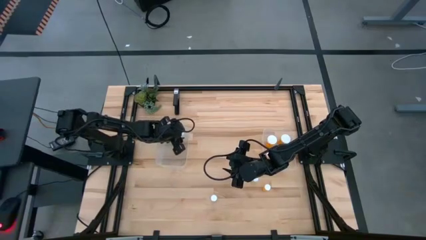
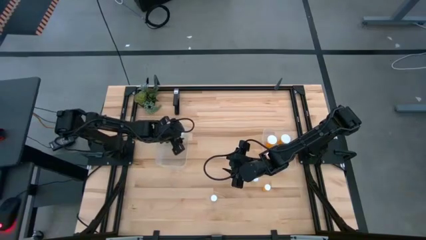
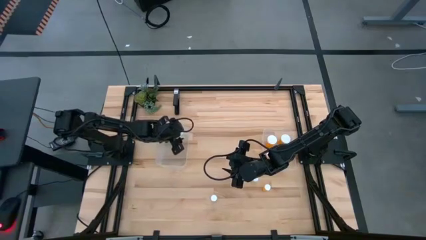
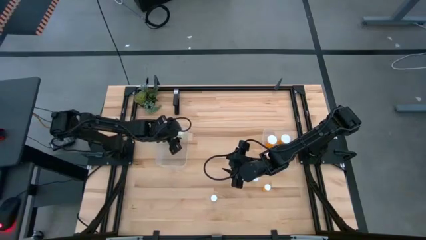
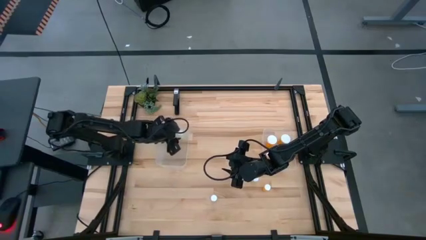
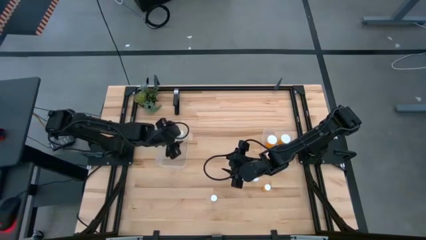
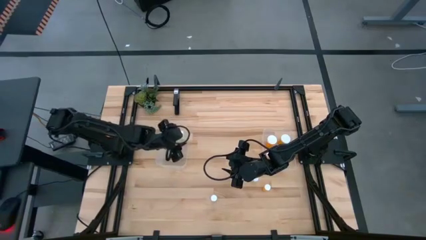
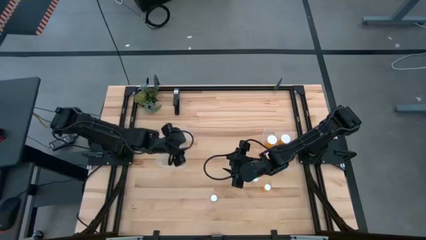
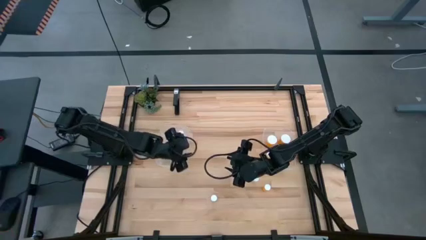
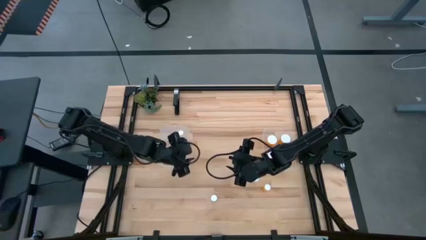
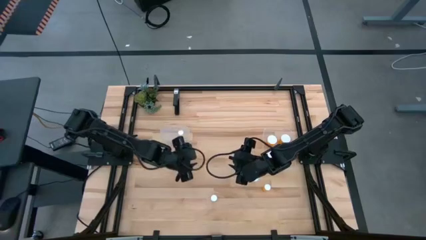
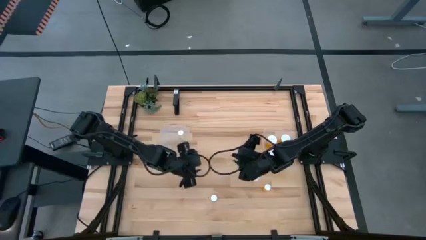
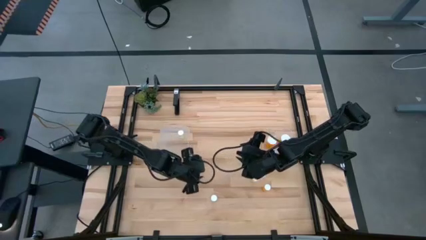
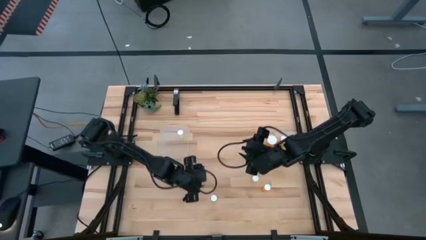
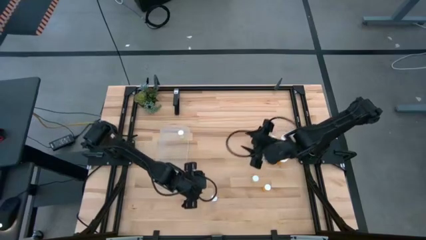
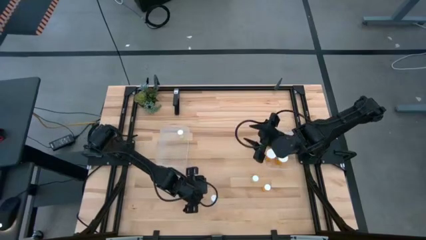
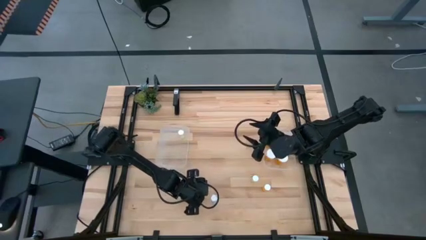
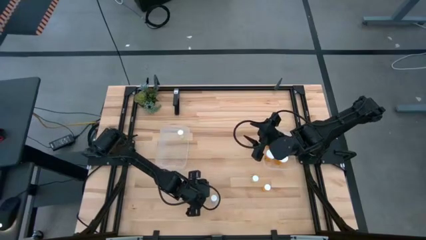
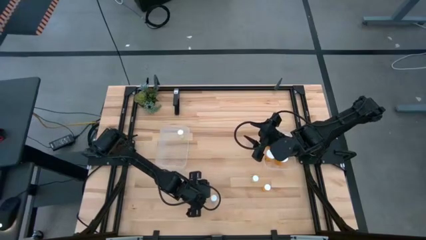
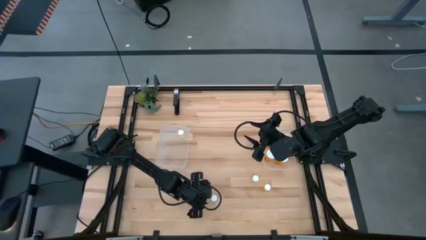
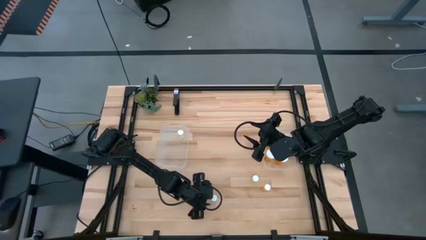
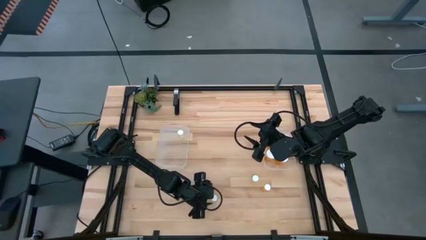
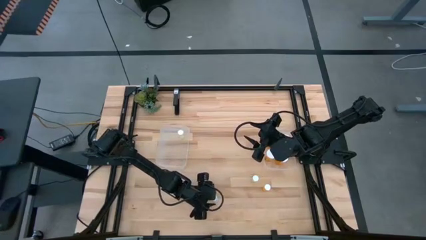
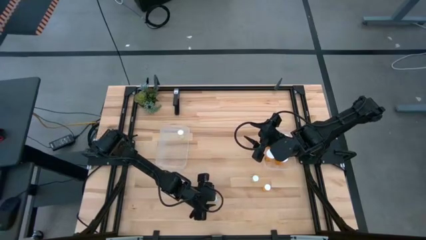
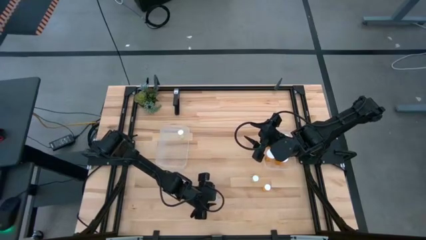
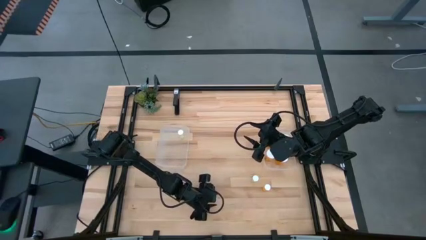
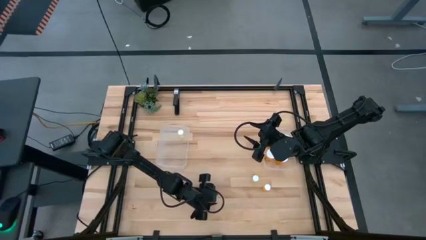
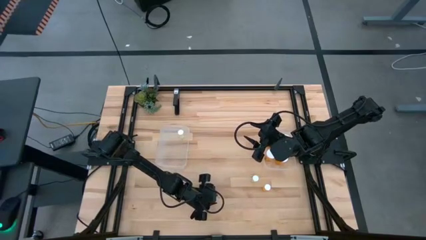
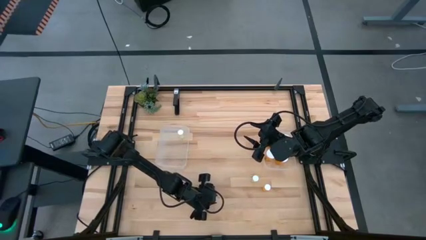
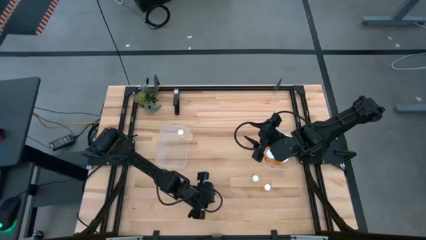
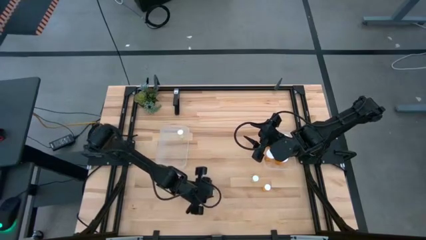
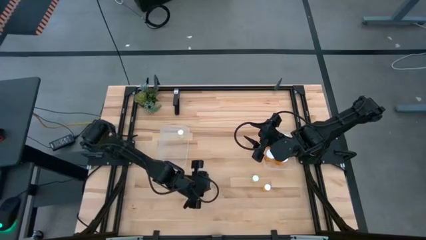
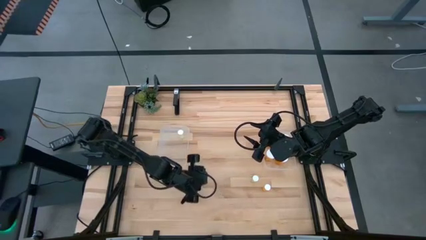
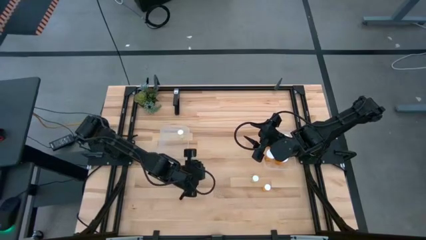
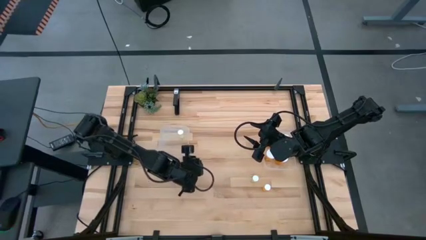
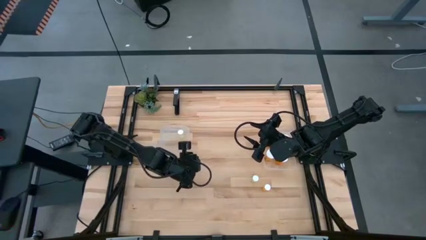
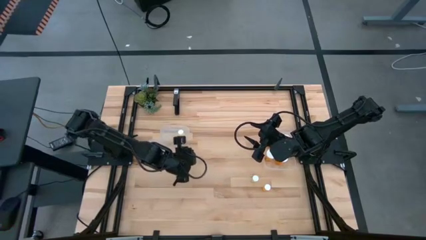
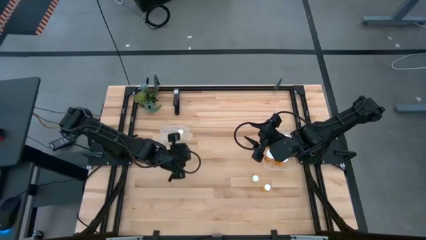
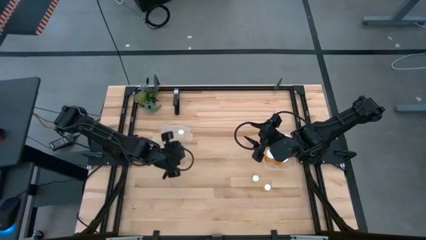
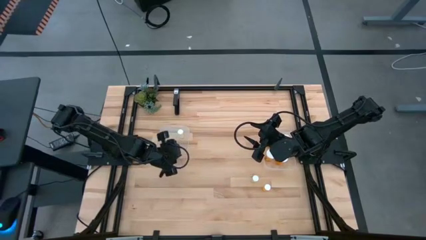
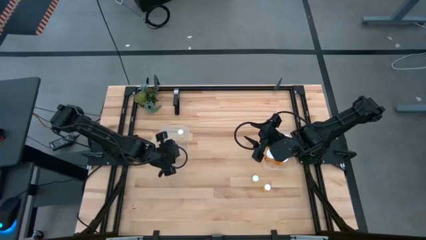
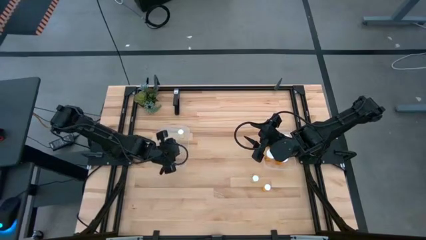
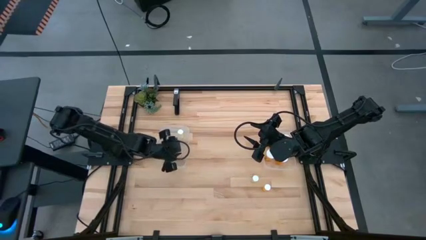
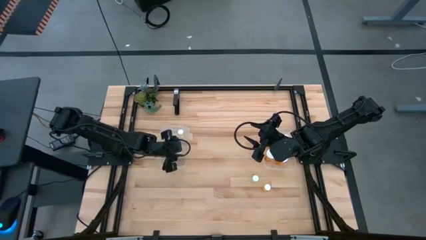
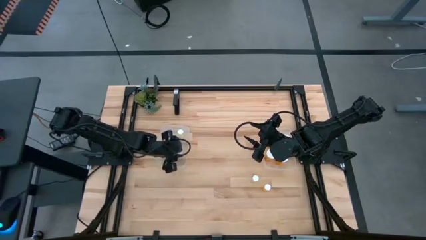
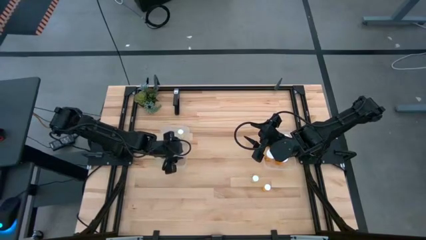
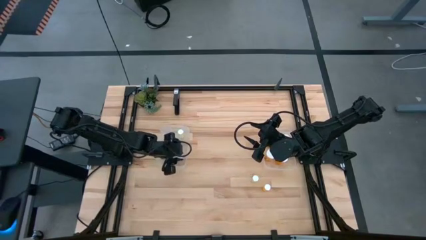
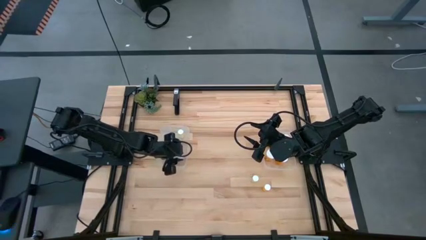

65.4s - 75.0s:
Task: Pick and place medicine bottles into bin by pill shape (circle, oval)
Put the left yellow pill bottle into the left transparent bin

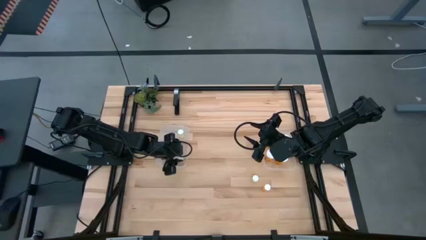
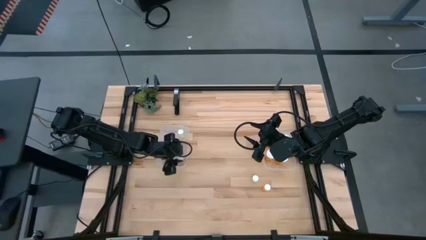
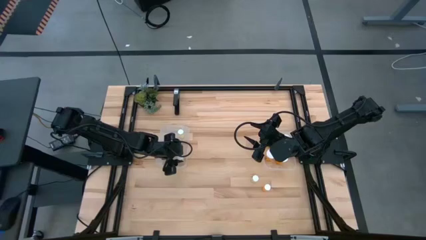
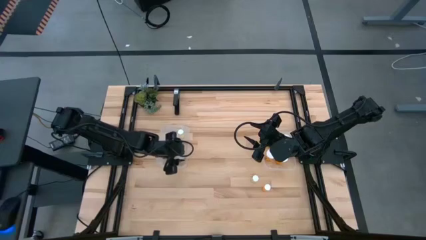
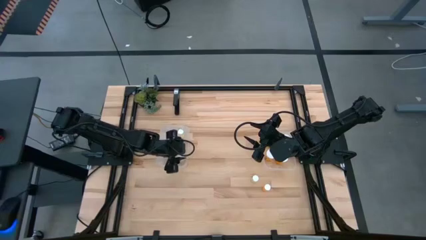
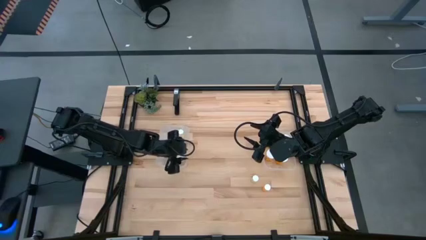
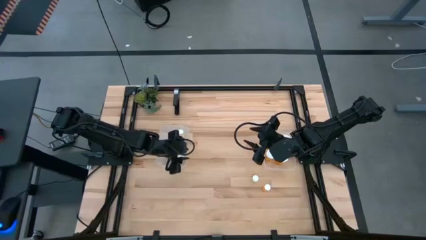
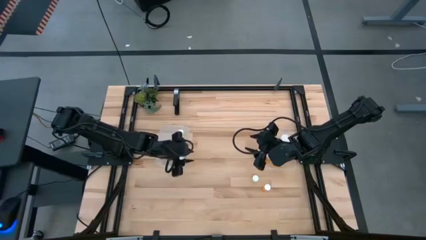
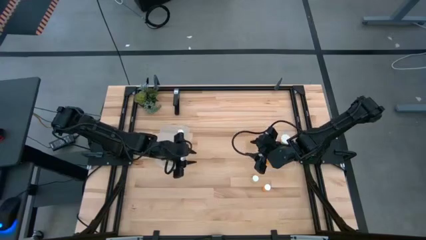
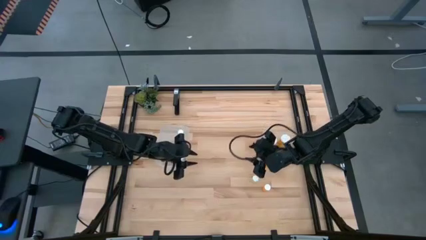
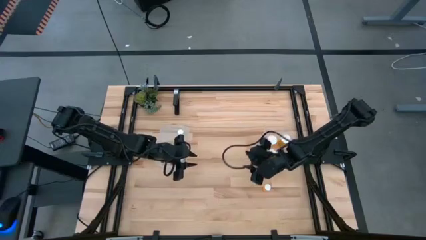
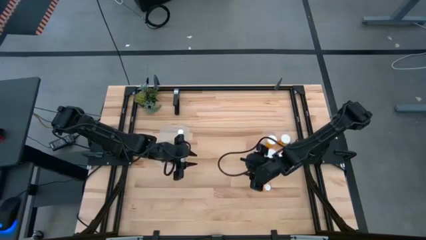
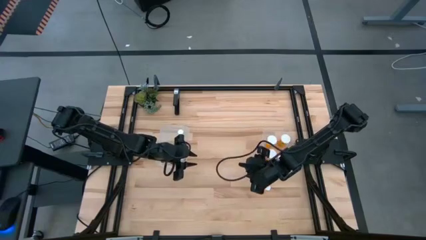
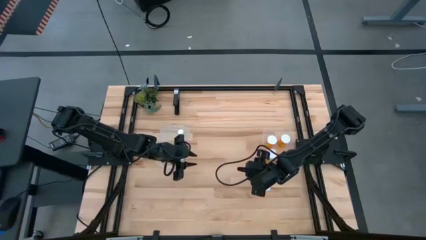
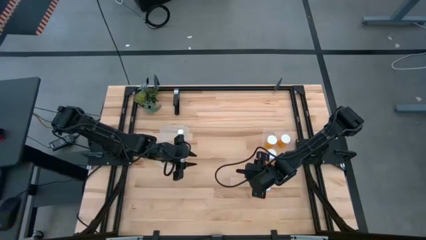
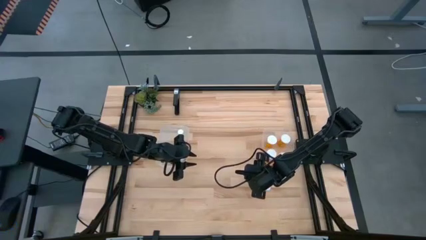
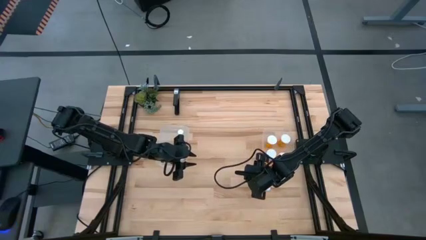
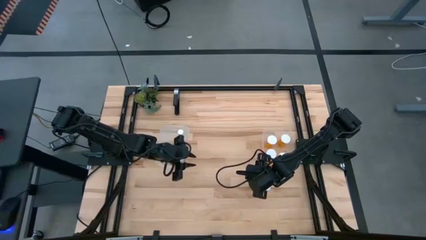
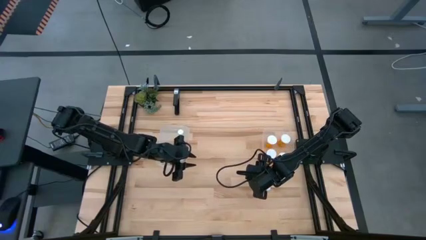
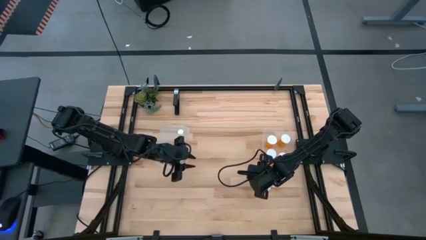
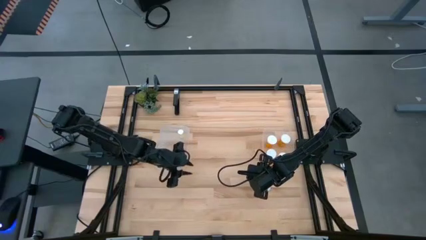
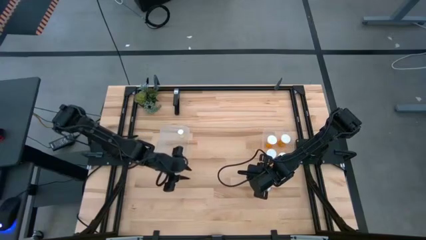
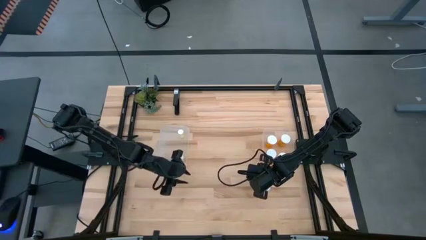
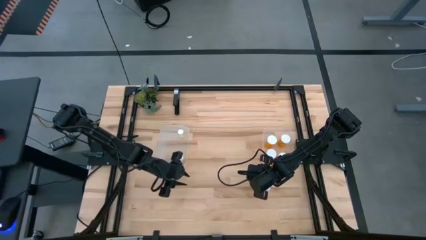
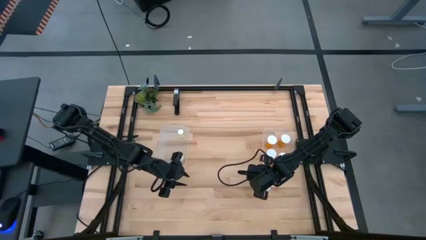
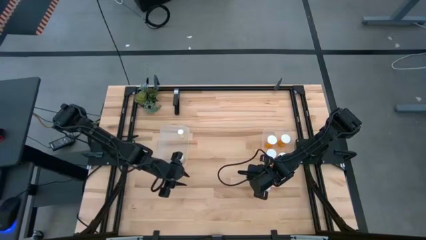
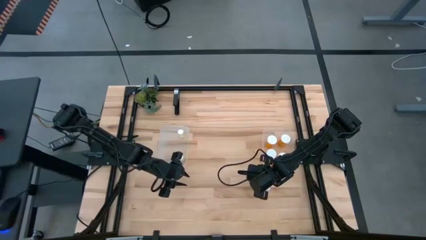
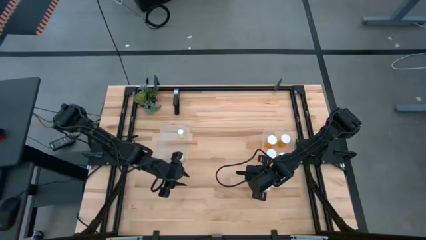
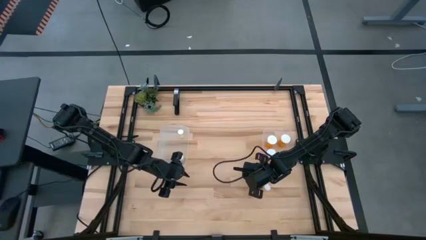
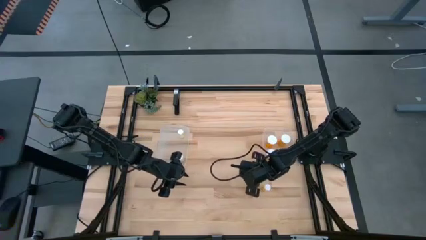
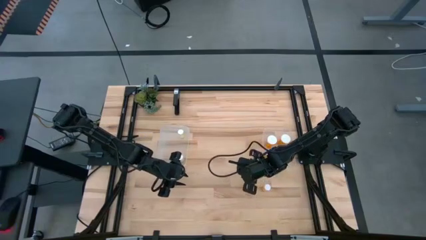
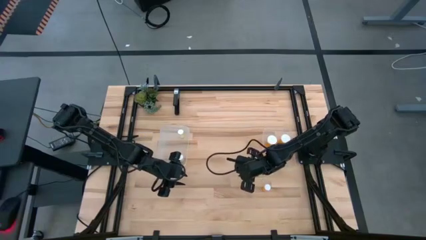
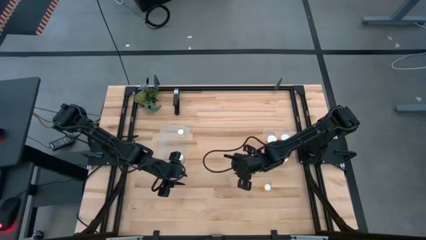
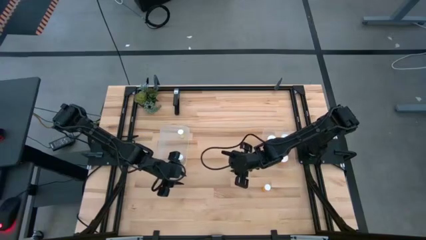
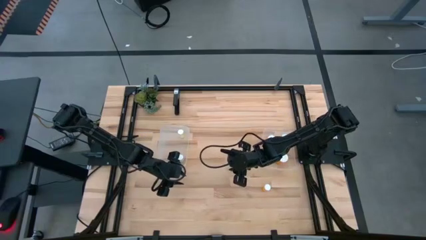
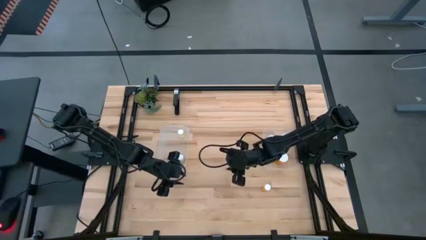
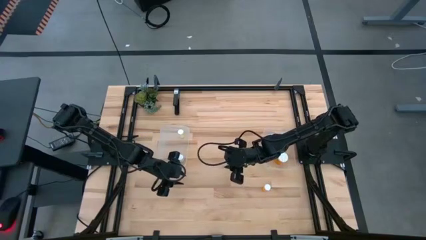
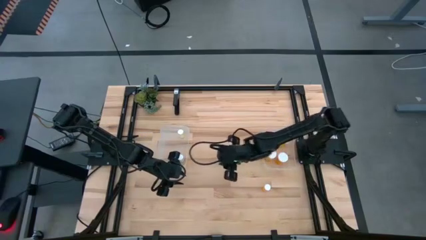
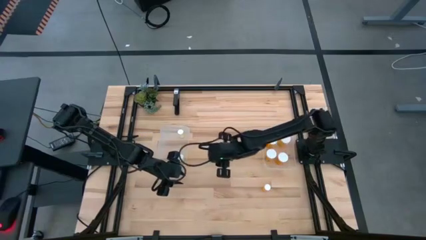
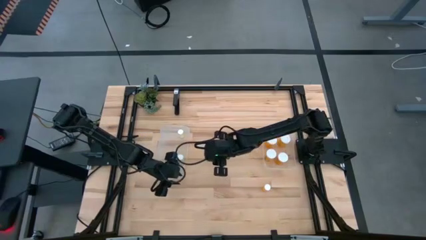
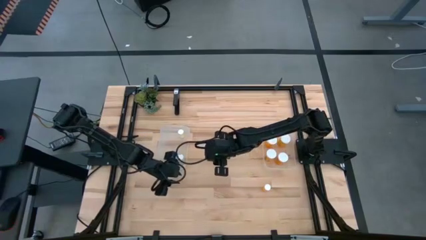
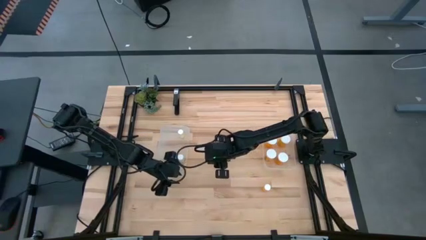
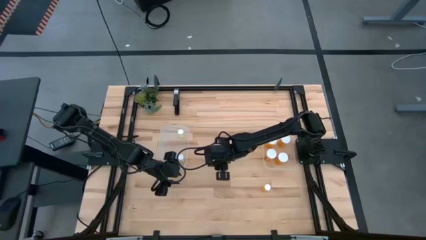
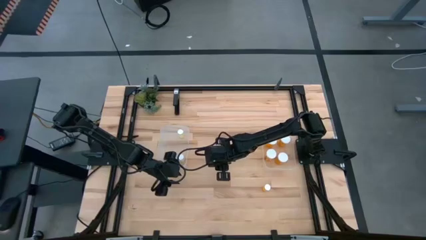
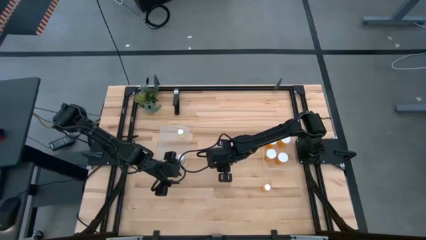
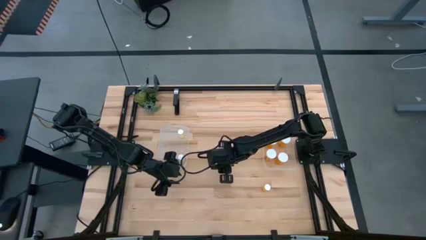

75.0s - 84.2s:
Move the yellow pill bottle to the center of the table
